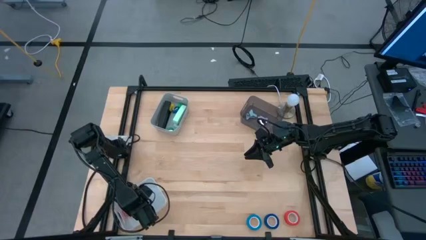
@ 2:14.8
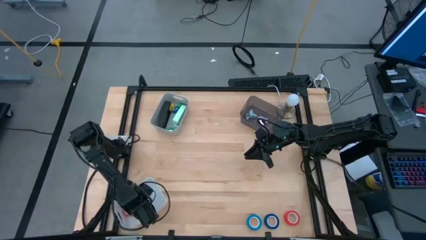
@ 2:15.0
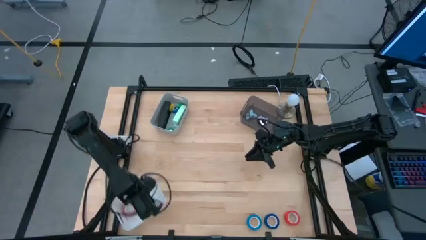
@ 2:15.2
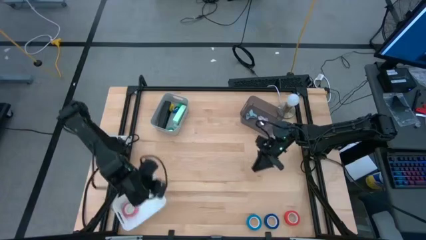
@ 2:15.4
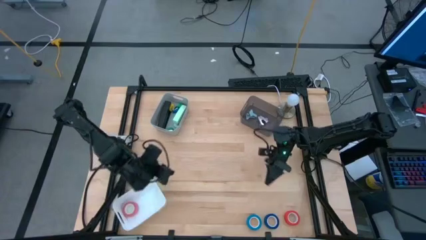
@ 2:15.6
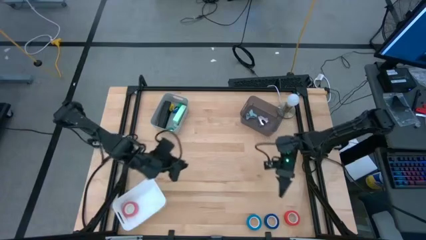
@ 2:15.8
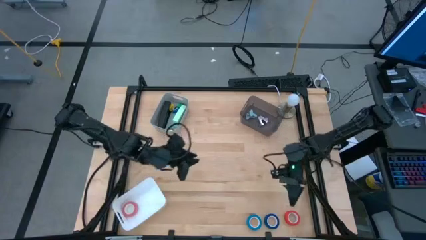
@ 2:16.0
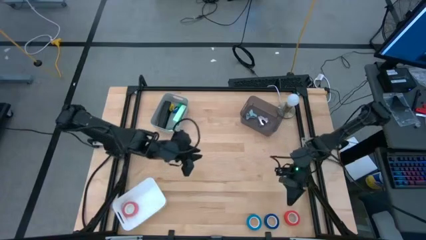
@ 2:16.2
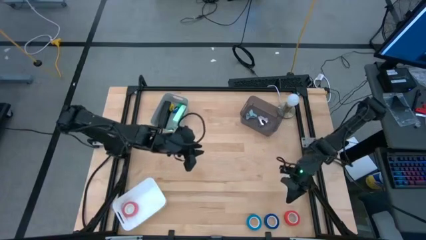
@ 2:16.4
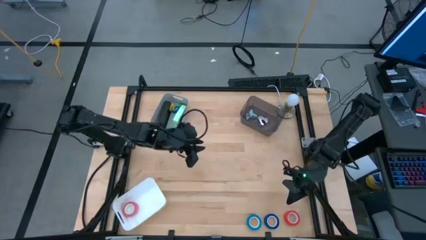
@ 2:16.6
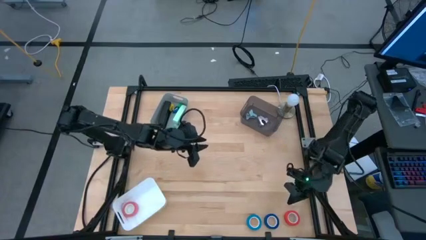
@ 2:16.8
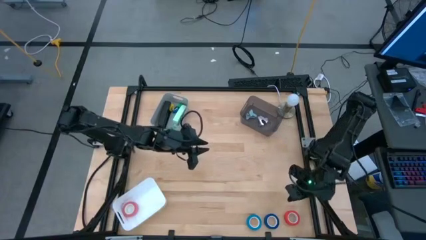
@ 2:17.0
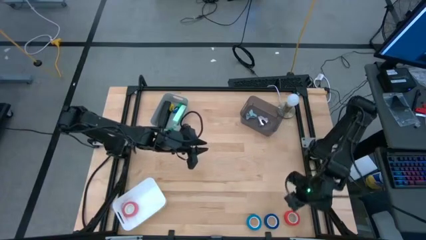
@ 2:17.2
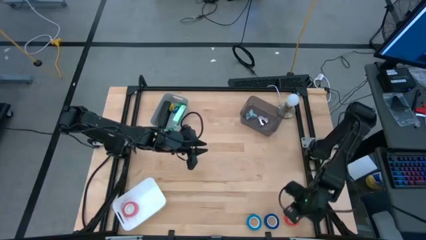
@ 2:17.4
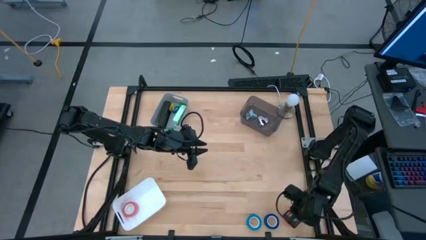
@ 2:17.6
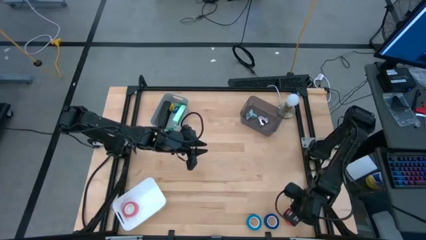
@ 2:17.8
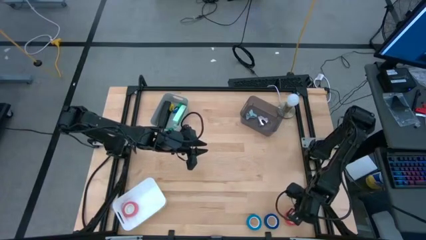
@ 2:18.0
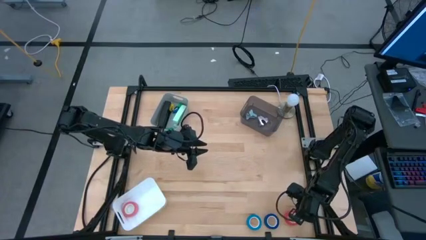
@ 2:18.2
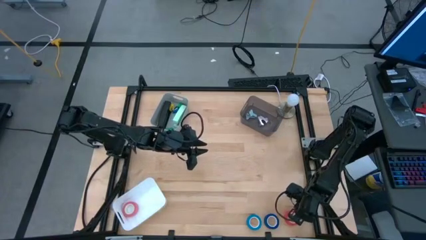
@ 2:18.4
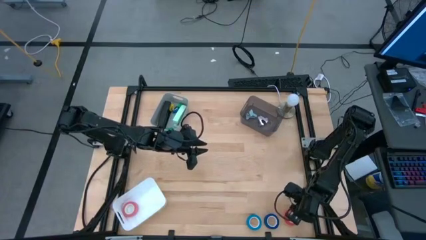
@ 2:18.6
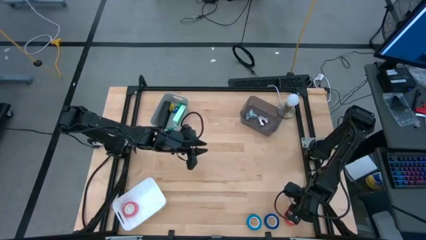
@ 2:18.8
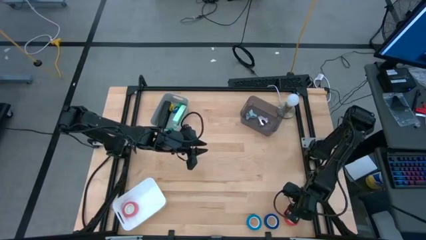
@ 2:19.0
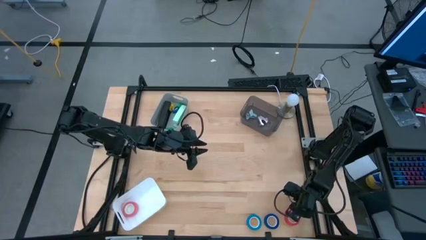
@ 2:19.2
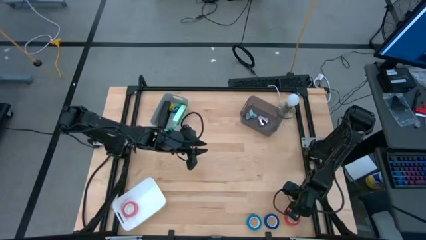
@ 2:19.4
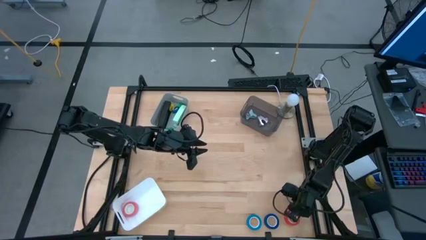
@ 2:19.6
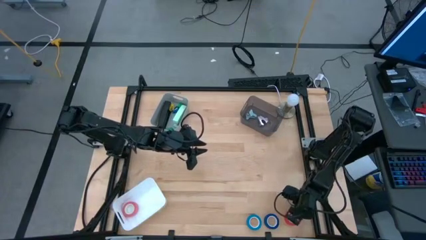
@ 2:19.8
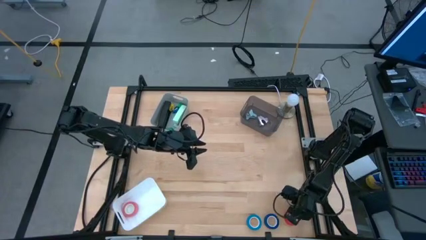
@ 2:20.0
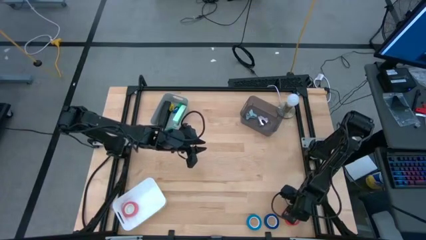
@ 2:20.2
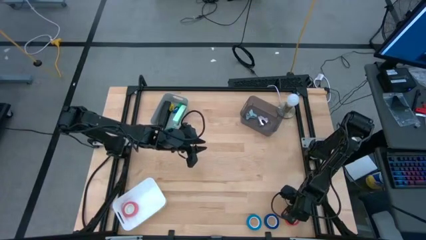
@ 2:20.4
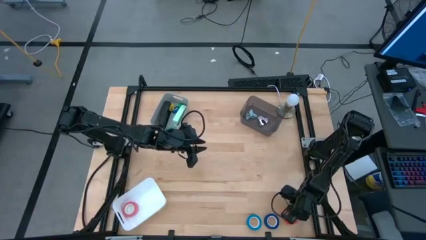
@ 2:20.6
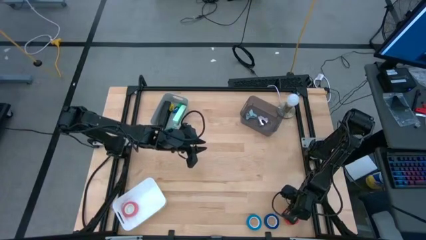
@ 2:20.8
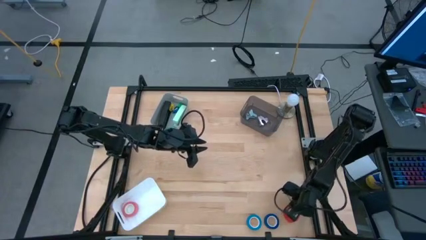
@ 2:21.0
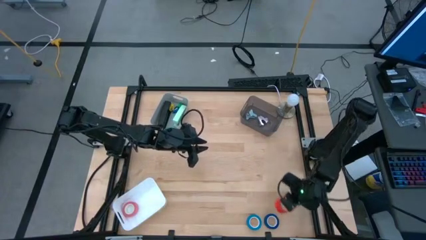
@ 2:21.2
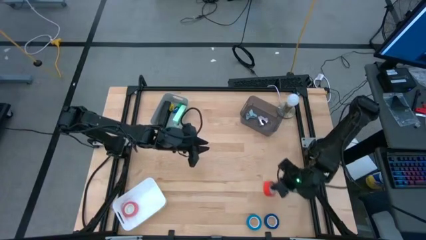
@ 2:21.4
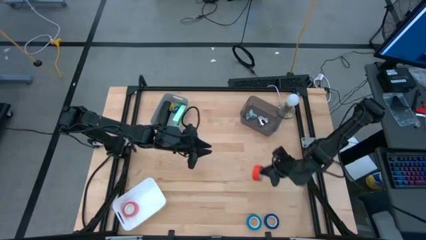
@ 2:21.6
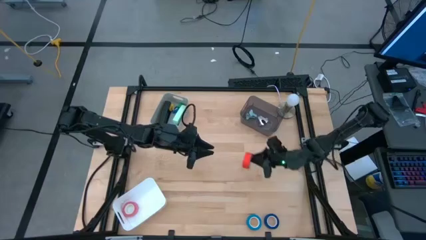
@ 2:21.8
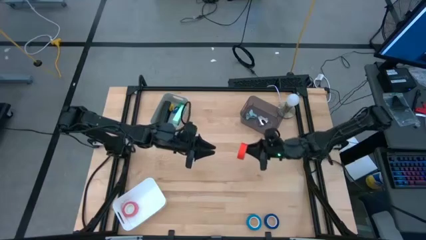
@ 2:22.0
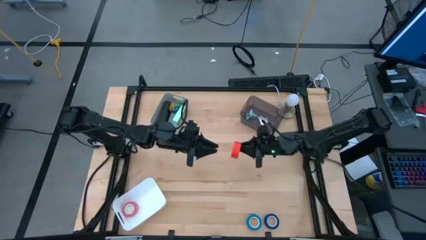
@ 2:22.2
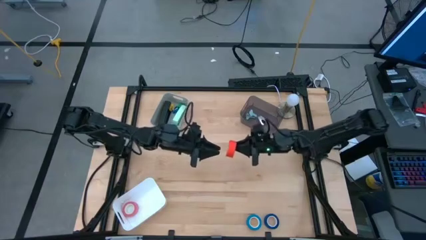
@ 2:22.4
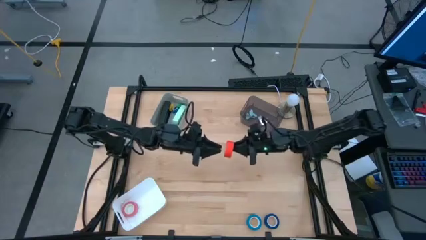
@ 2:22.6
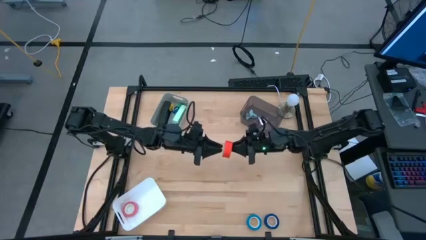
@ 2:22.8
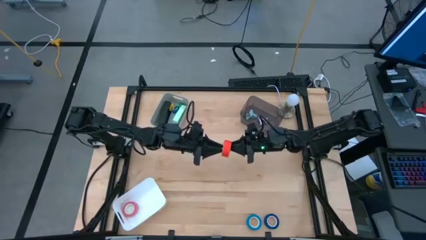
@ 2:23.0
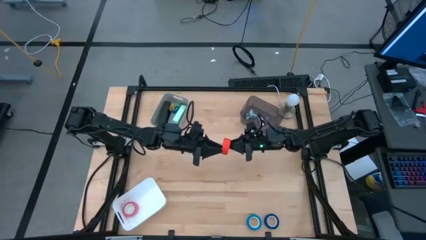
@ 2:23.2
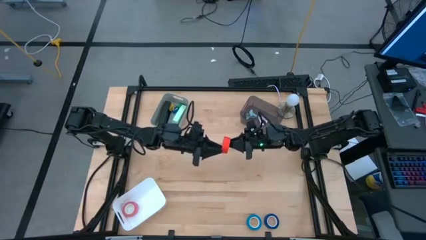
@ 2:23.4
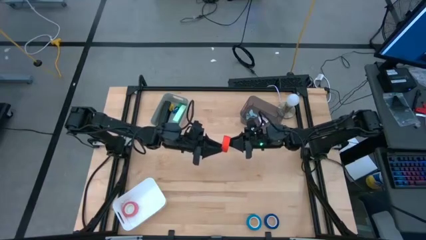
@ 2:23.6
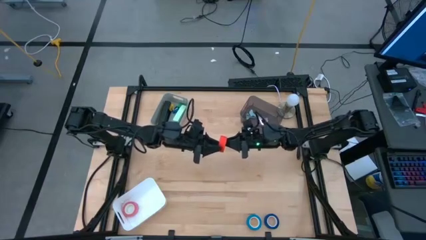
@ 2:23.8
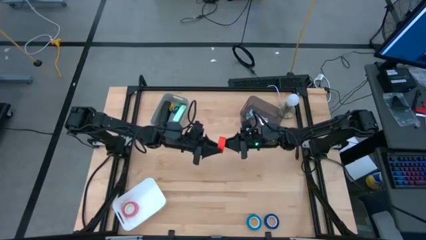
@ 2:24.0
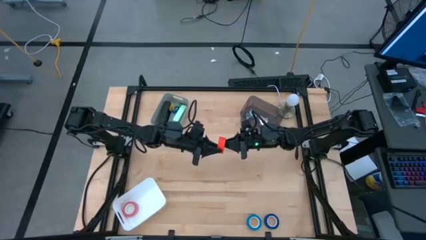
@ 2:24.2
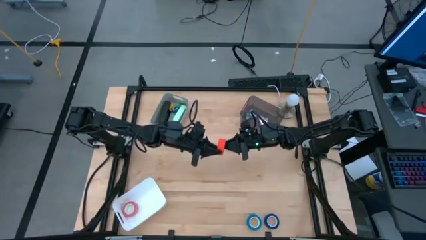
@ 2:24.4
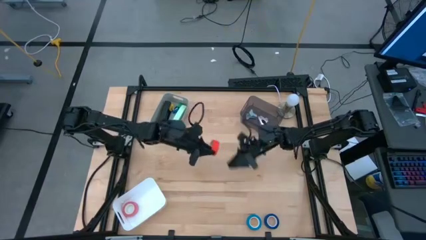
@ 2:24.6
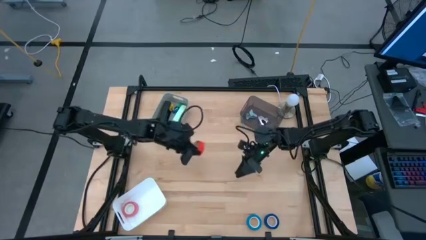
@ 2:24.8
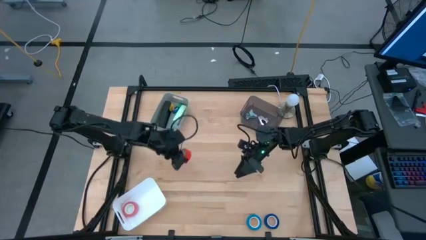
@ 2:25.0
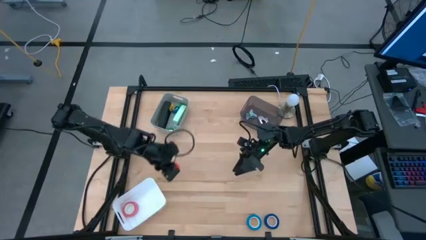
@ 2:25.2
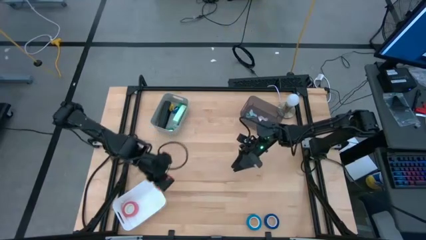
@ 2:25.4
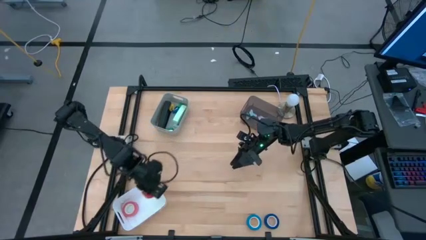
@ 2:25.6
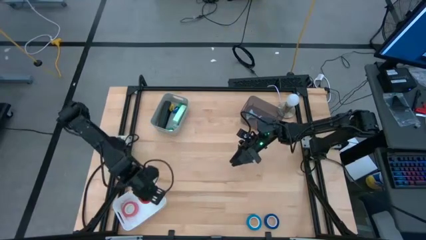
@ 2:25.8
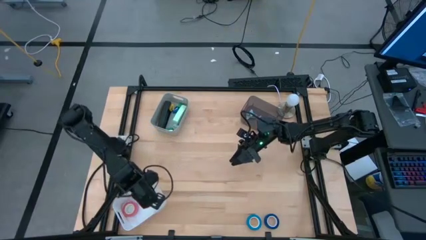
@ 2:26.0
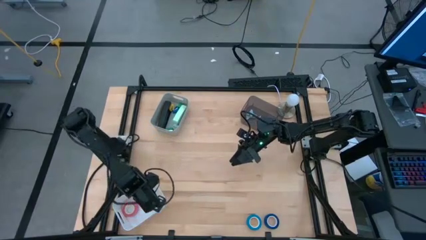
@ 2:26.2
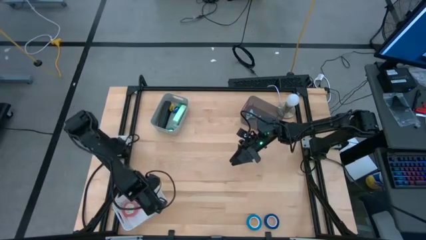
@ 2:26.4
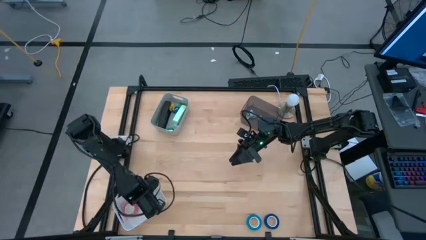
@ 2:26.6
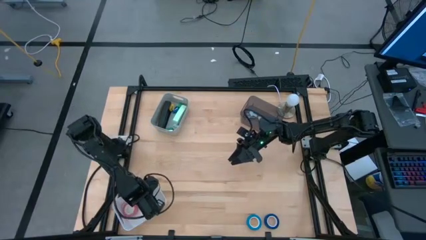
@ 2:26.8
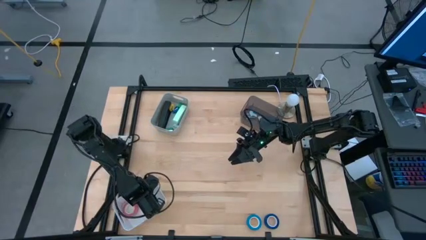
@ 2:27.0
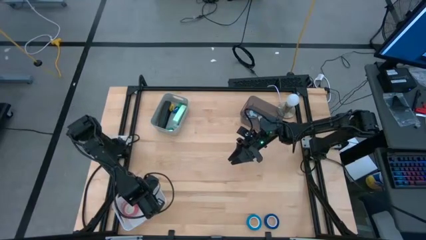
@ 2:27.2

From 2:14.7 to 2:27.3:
Task: Pick and place Stapler, Stapler remover, tape
Put the orange tape into the white bin
